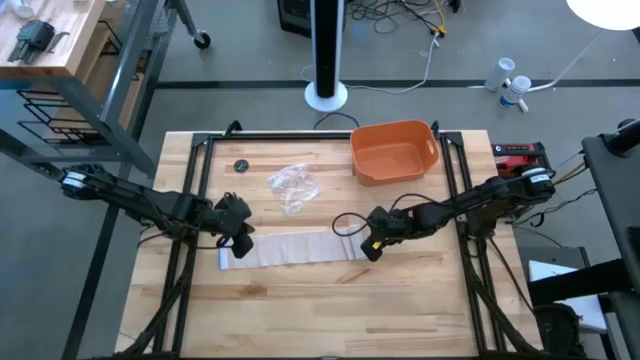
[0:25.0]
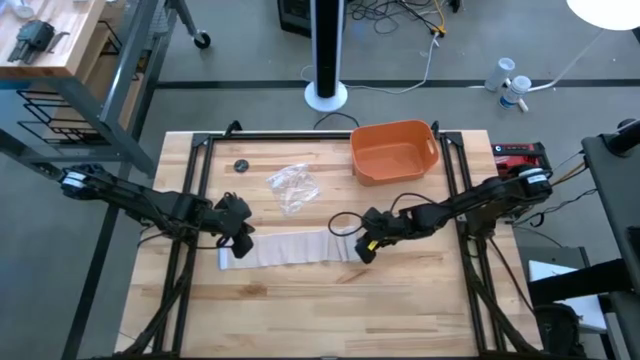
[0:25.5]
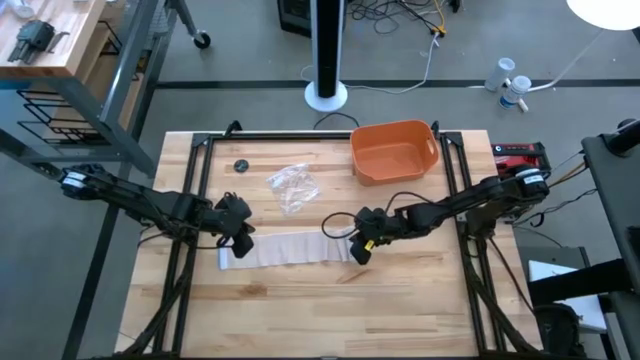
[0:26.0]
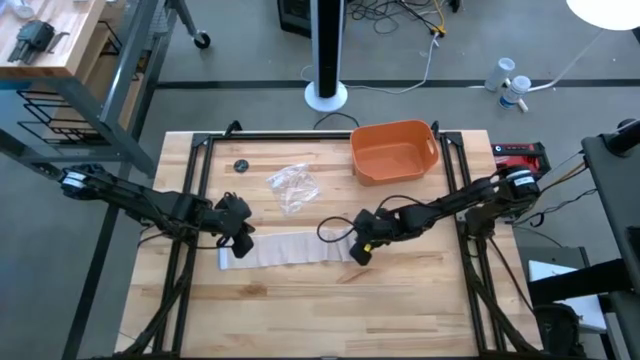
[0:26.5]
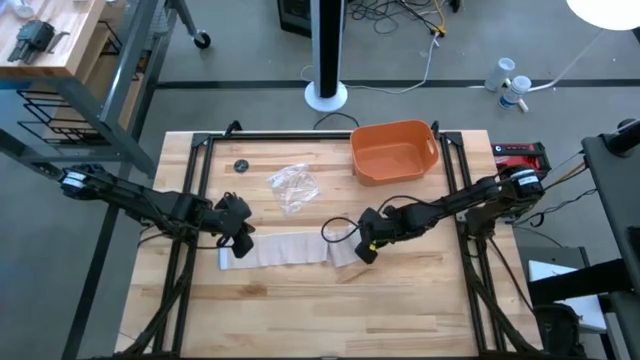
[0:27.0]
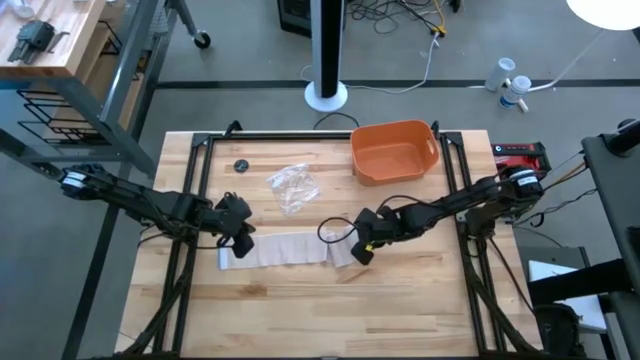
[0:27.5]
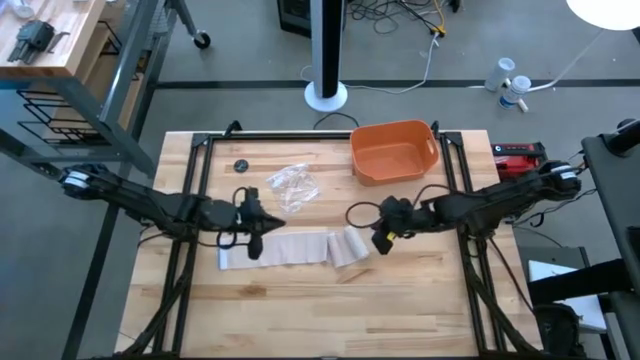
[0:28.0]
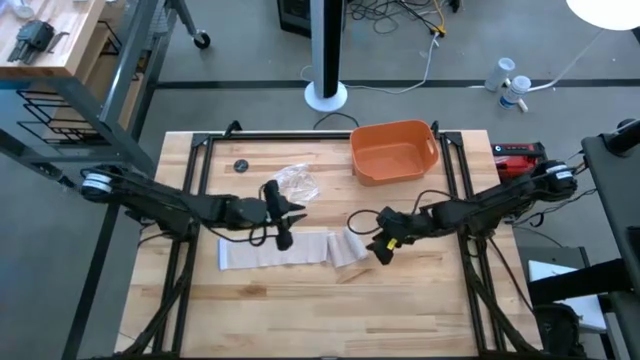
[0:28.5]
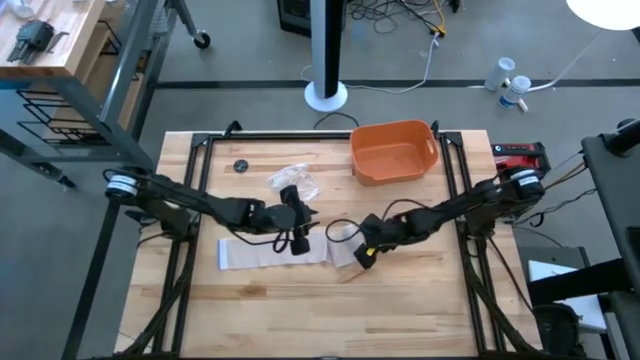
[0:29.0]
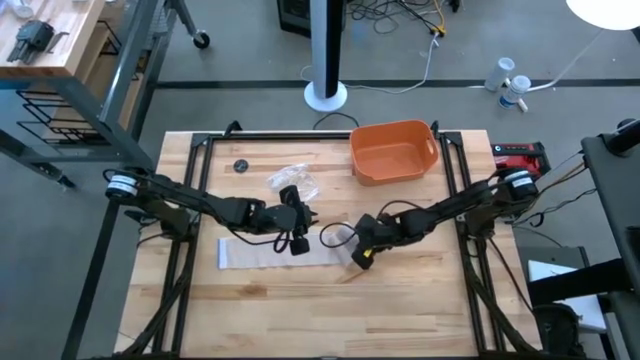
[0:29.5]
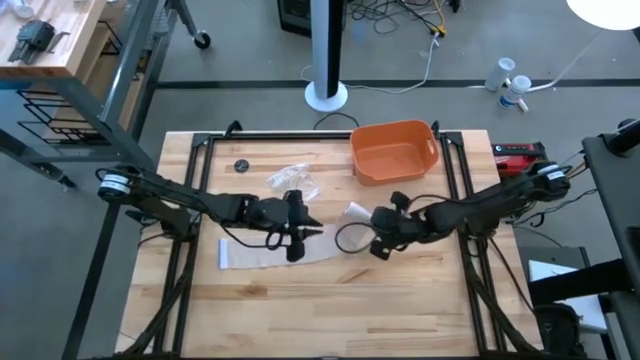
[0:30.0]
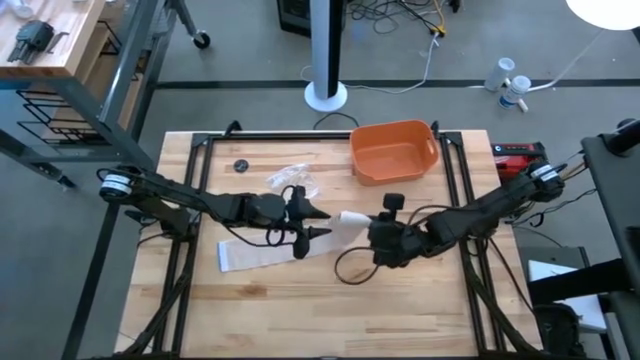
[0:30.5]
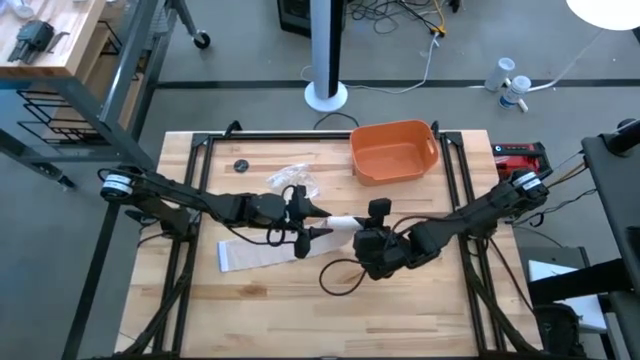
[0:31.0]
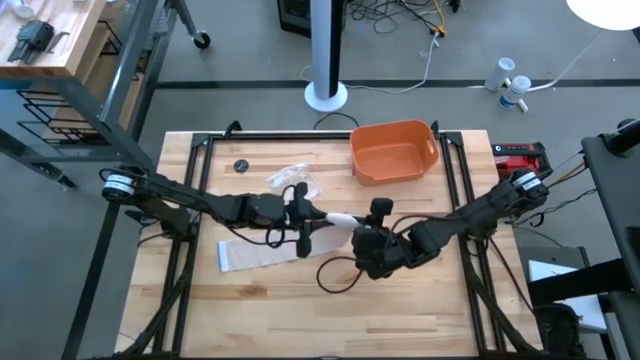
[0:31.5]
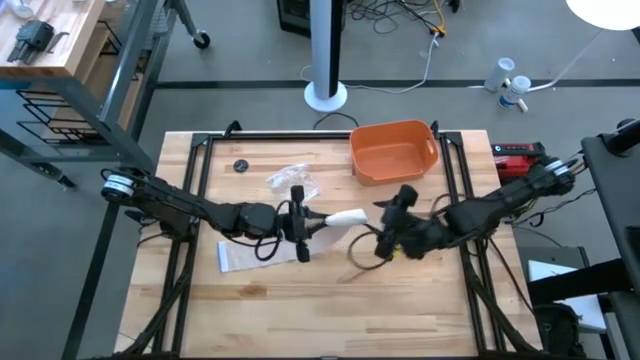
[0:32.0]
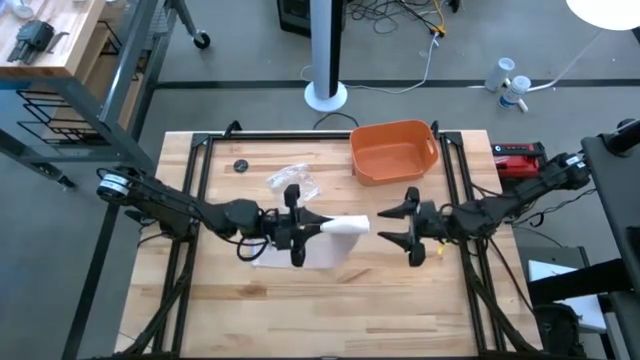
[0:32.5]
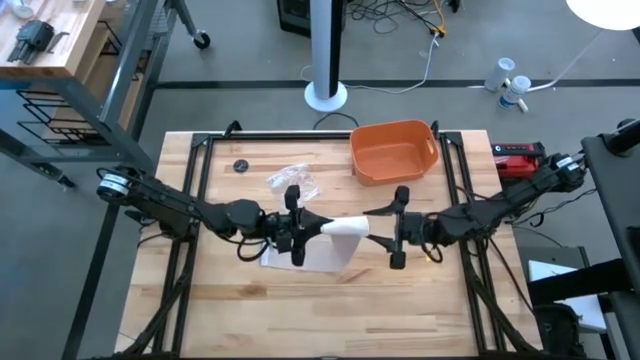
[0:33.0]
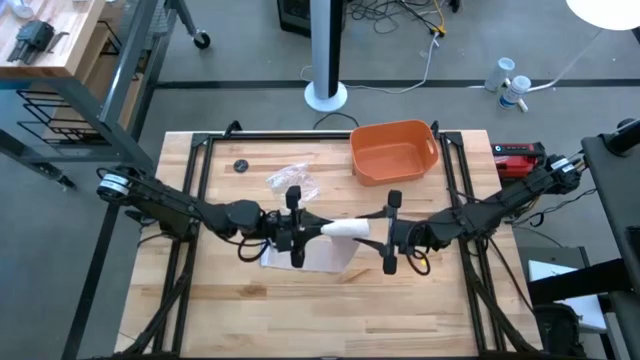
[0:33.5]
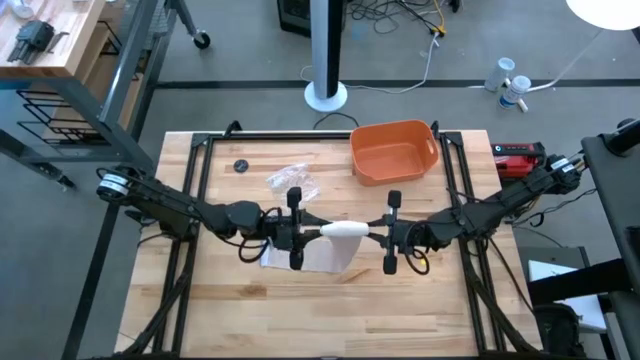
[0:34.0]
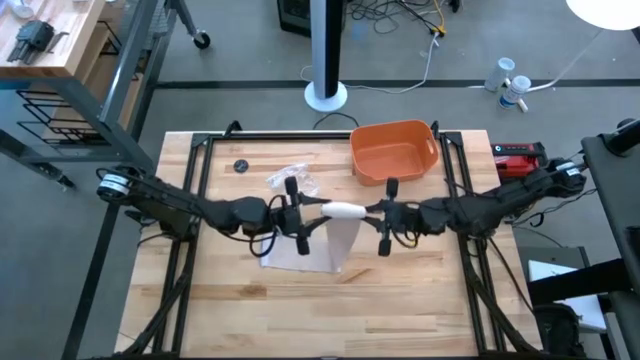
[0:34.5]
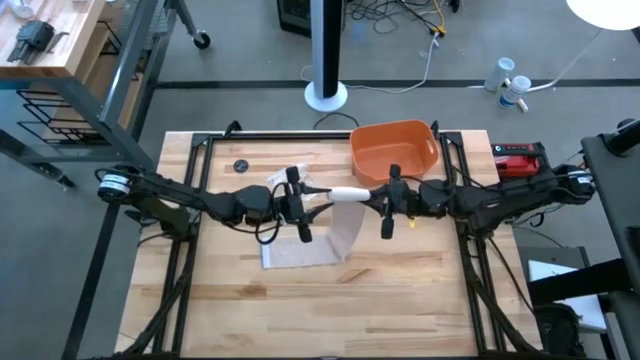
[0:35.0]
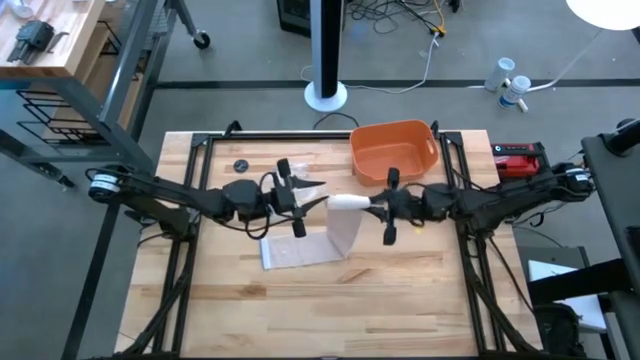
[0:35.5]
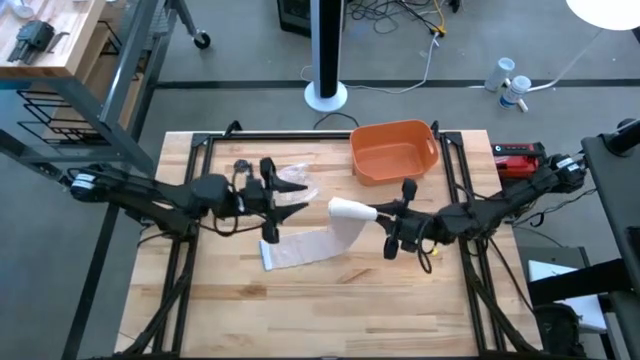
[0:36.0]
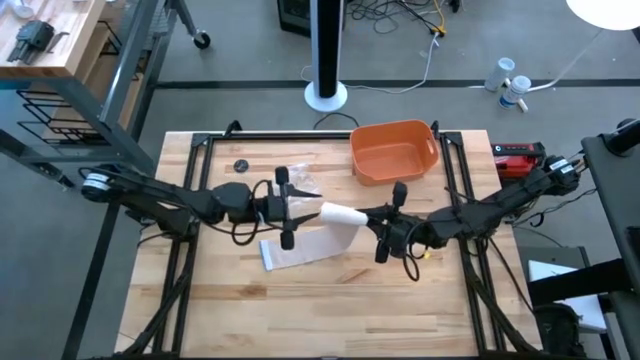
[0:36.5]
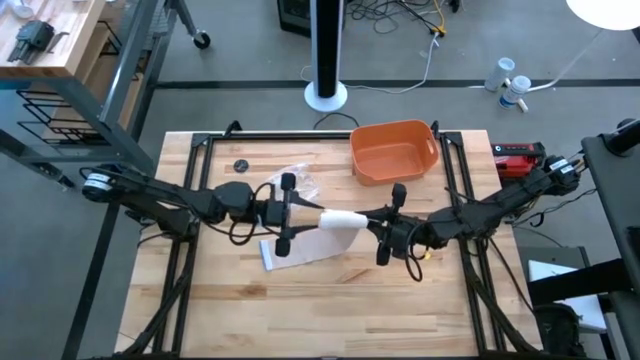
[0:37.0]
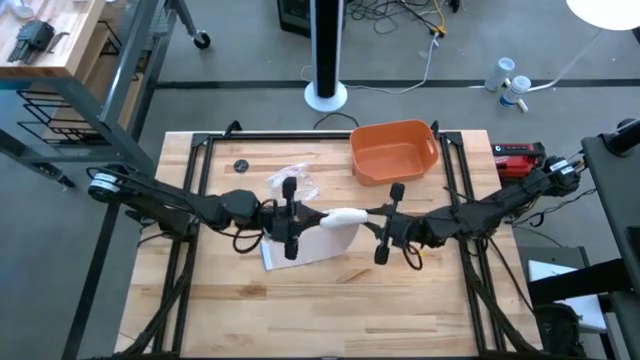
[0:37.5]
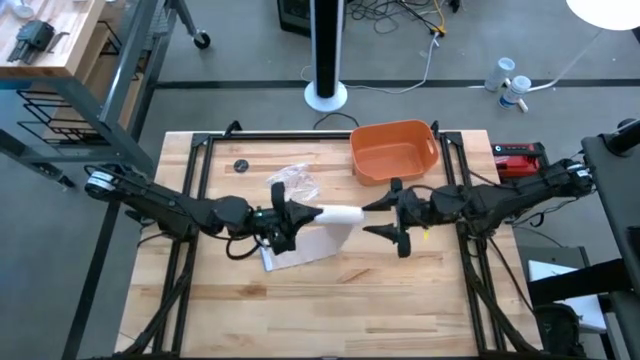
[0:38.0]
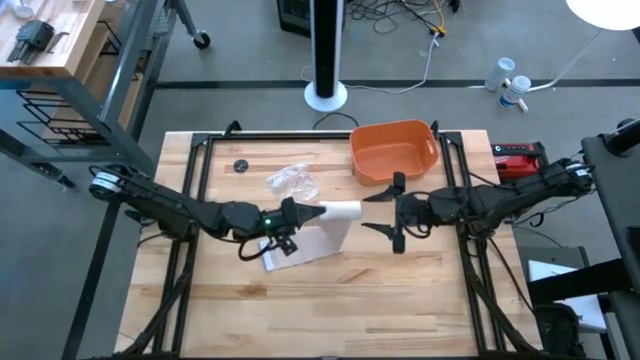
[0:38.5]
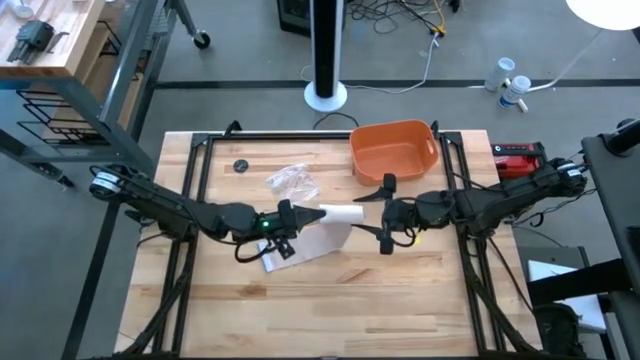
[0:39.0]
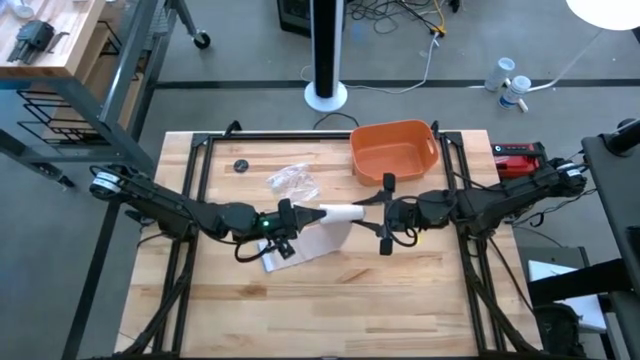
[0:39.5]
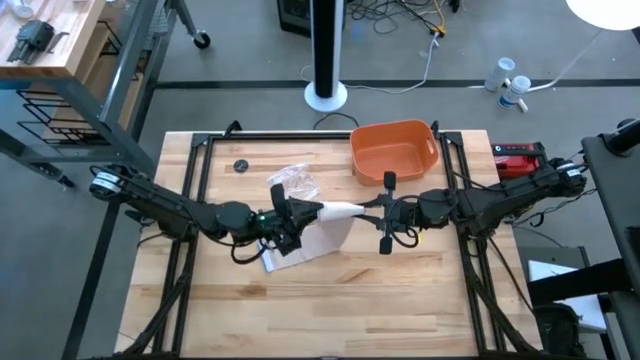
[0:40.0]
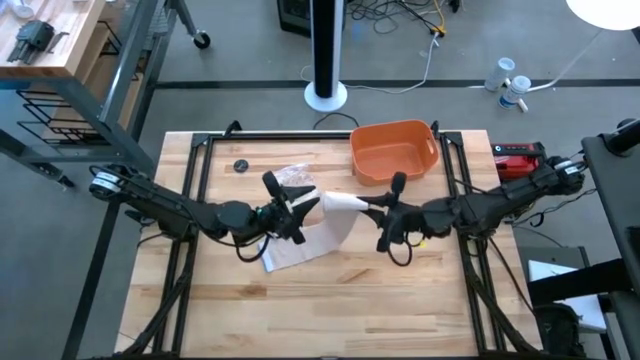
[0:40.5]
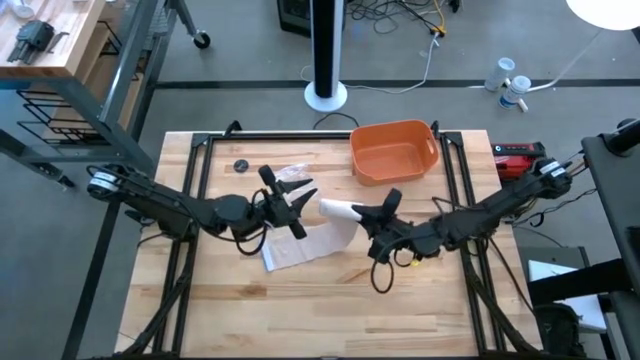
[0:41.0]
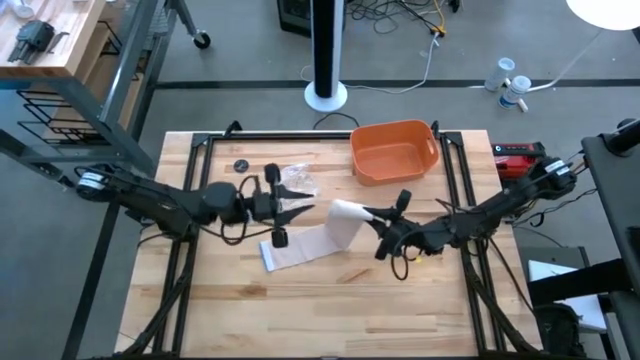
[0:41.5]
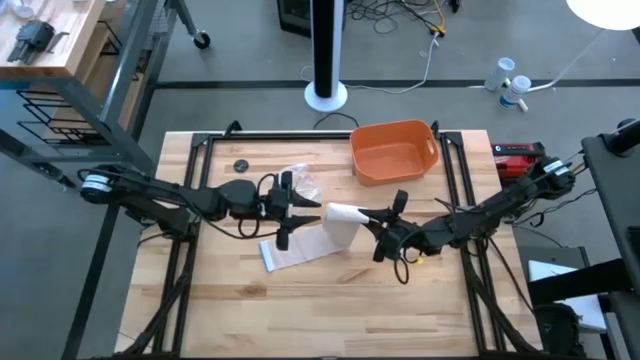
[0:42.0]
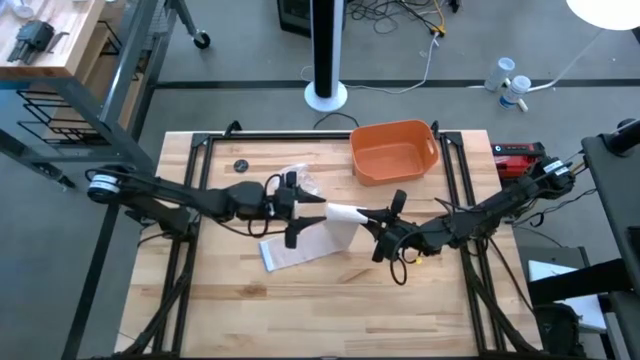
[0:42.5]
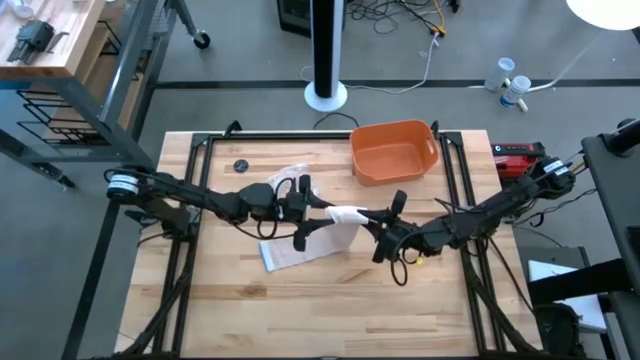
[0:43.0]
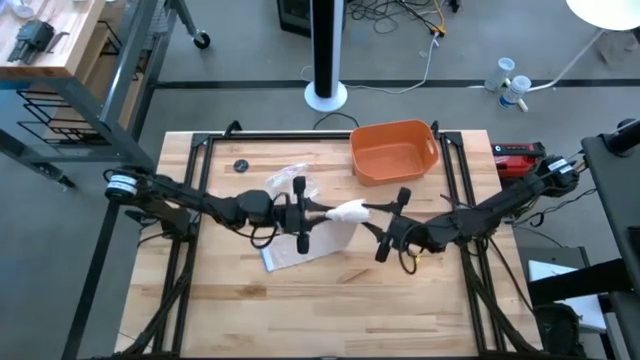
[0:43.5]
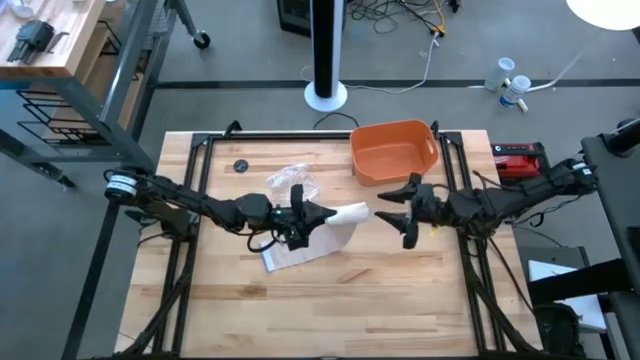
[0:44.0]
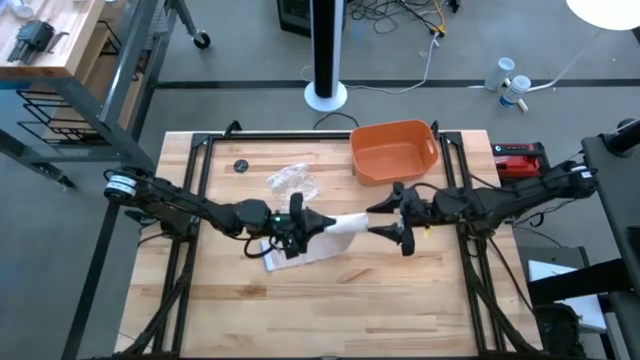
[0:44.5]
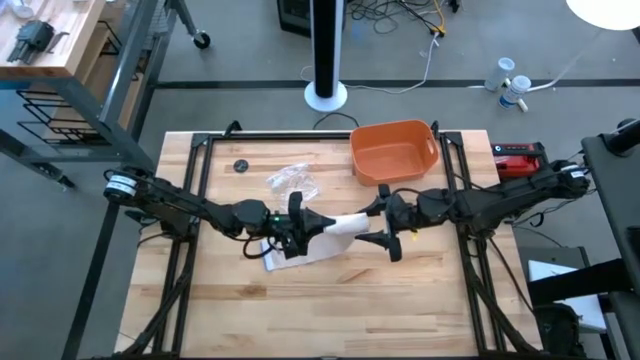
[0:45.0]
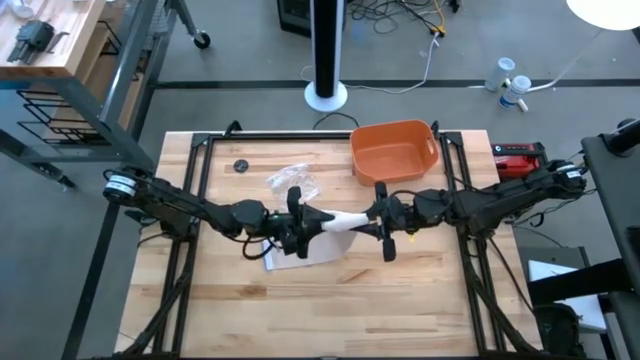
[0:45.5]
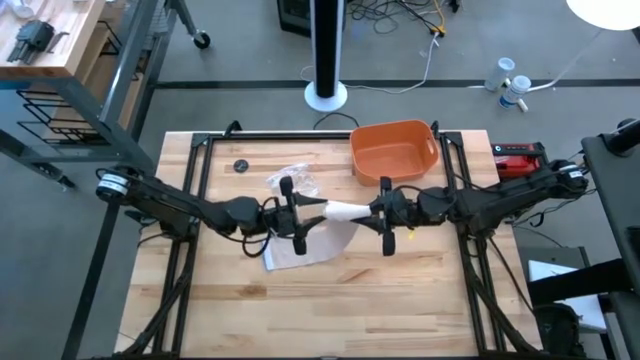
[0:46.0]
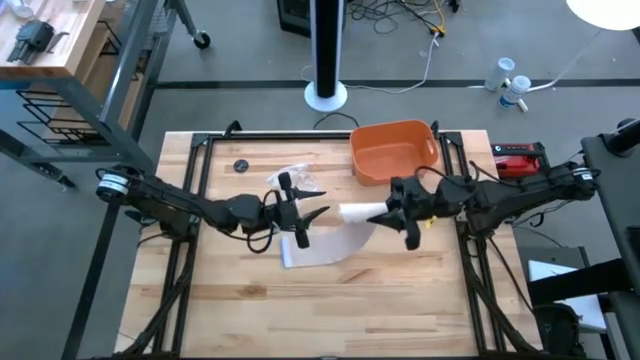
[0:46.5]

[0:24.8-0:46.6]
Task: Roll bandage
Roll the brown bandage
